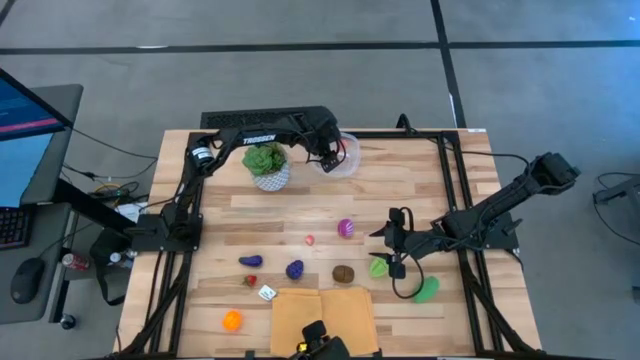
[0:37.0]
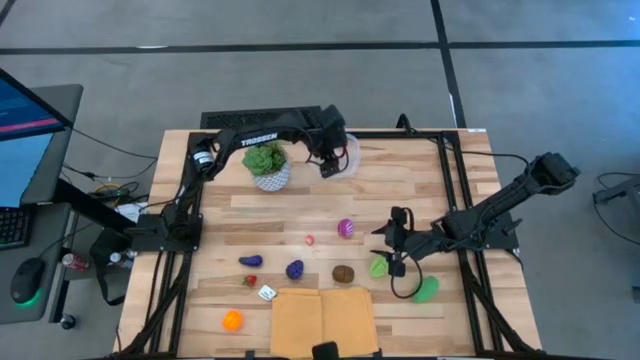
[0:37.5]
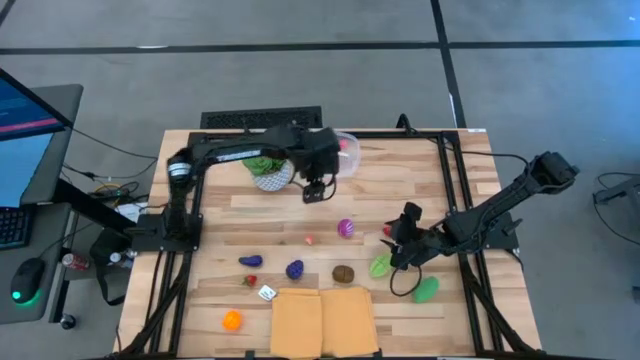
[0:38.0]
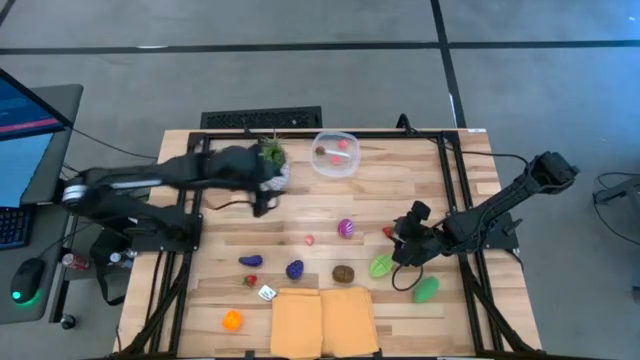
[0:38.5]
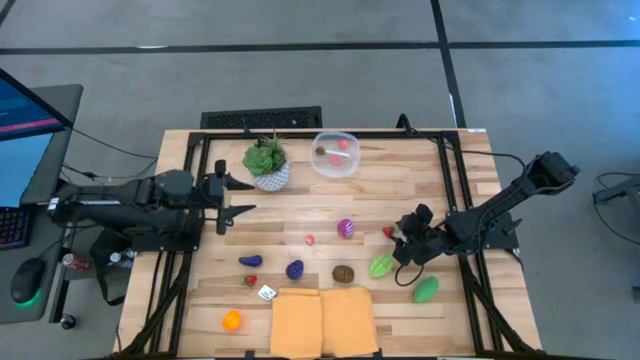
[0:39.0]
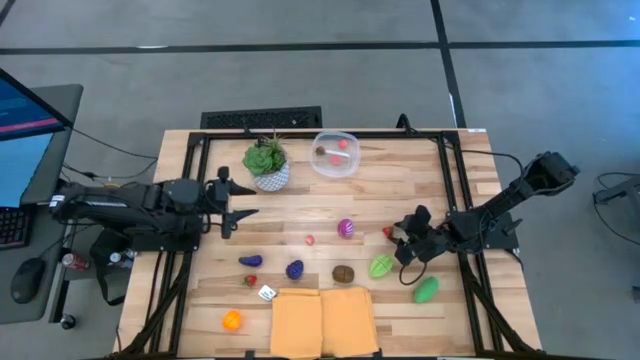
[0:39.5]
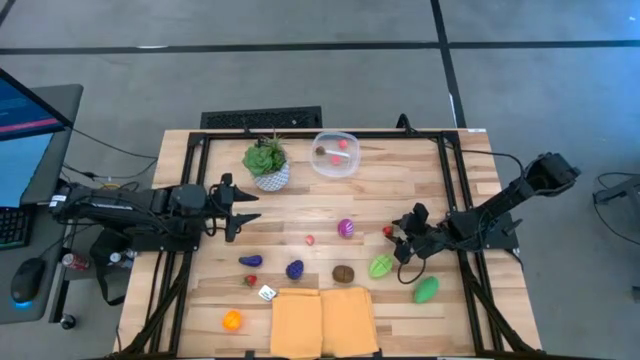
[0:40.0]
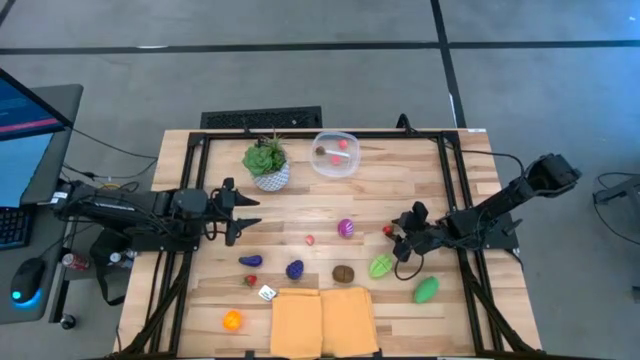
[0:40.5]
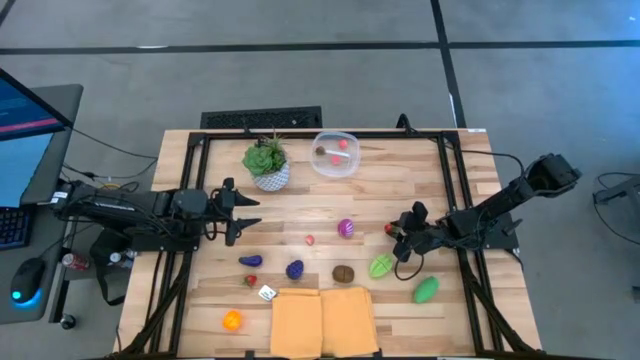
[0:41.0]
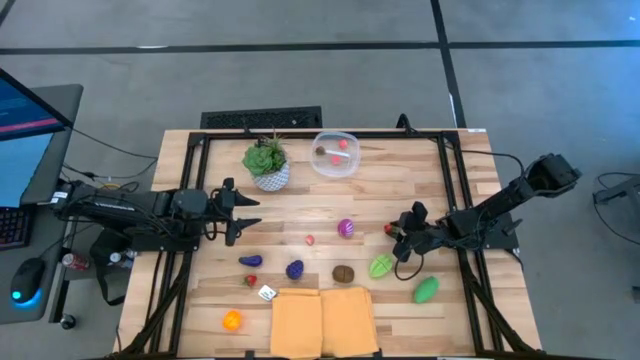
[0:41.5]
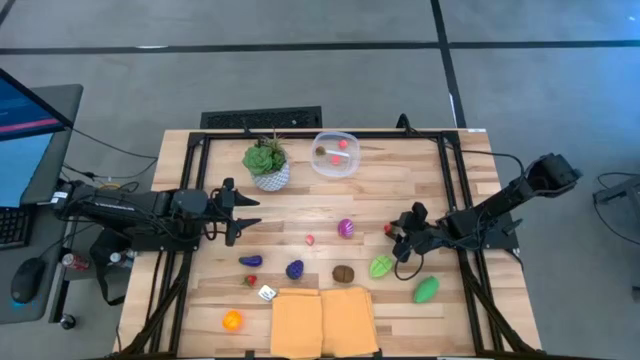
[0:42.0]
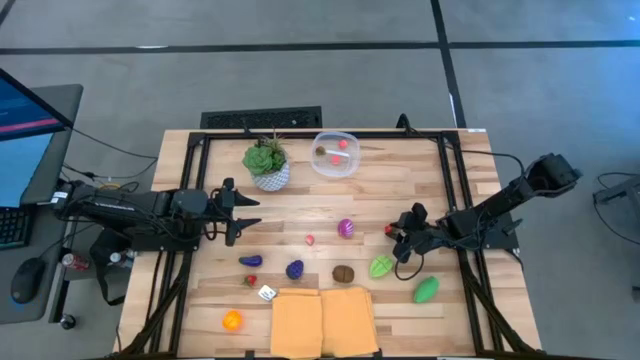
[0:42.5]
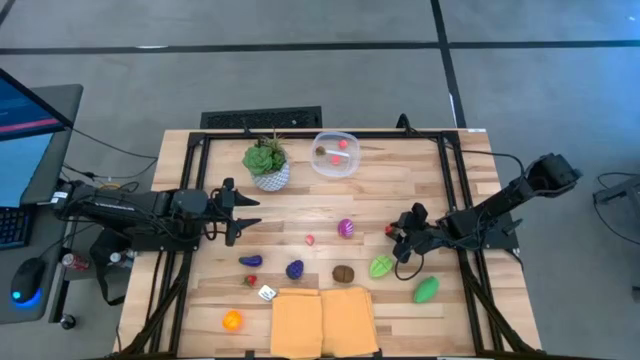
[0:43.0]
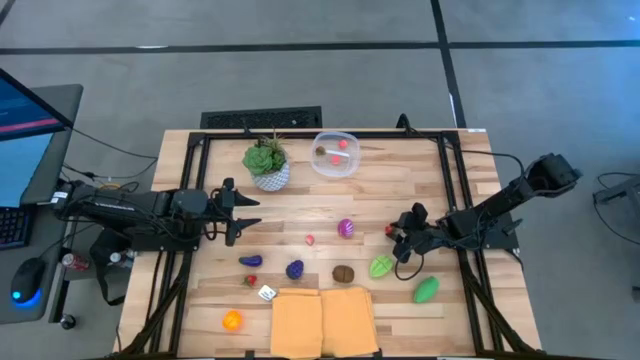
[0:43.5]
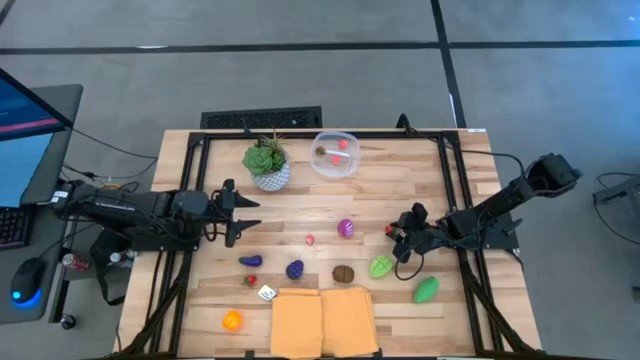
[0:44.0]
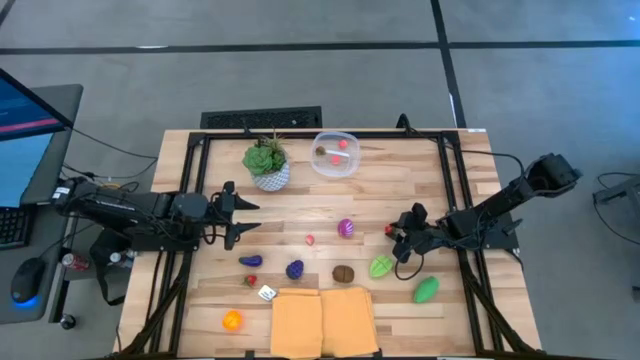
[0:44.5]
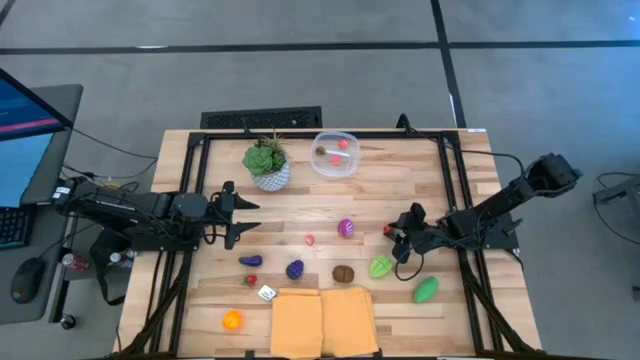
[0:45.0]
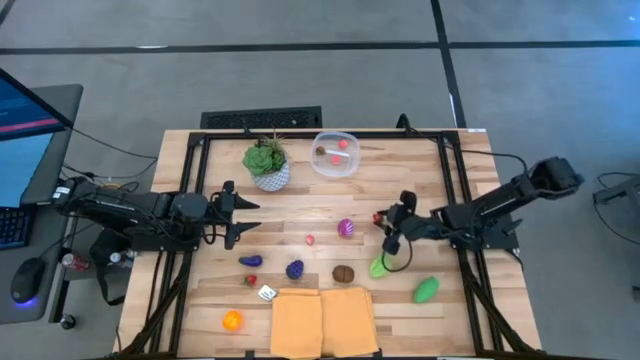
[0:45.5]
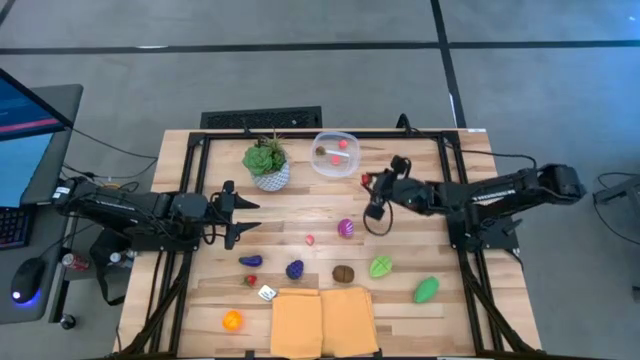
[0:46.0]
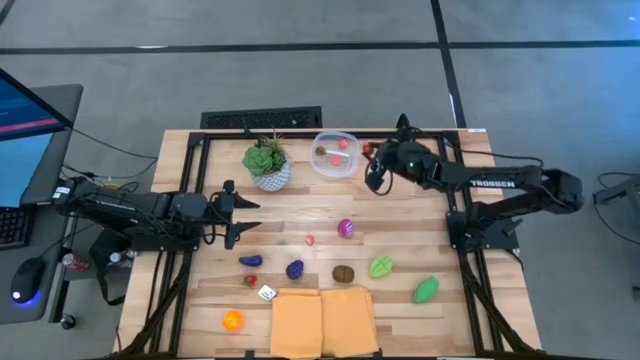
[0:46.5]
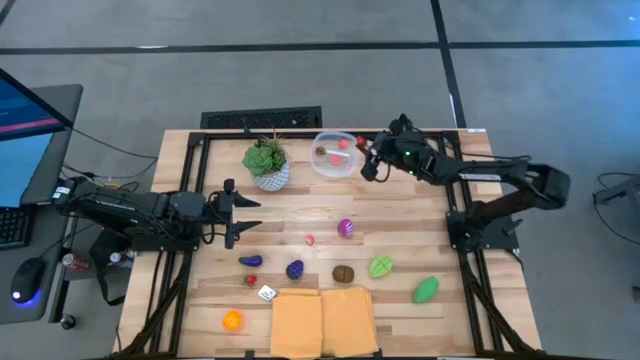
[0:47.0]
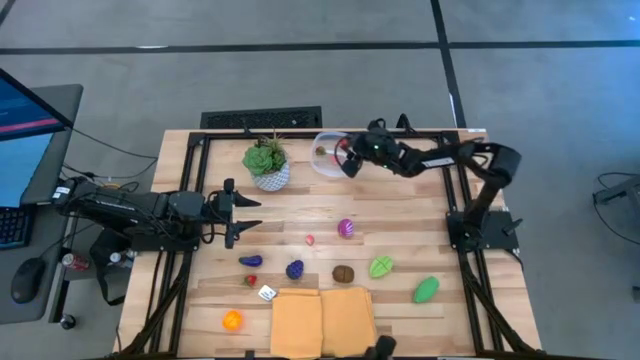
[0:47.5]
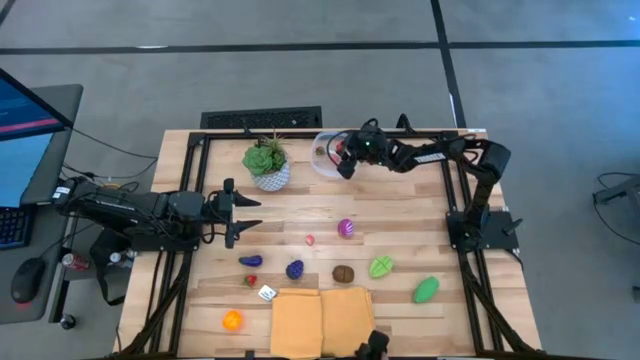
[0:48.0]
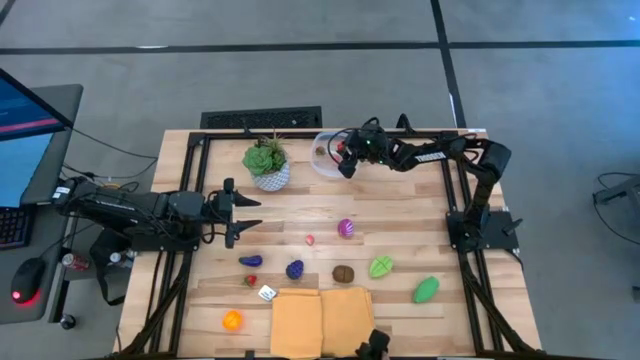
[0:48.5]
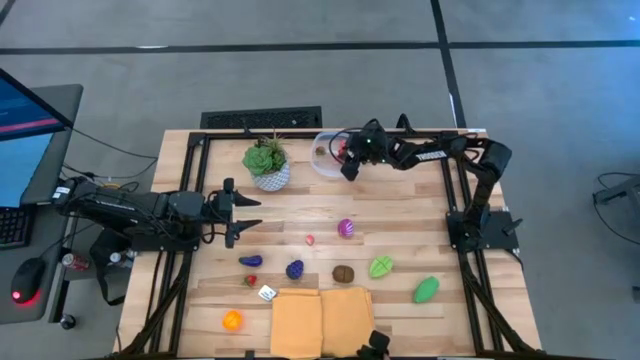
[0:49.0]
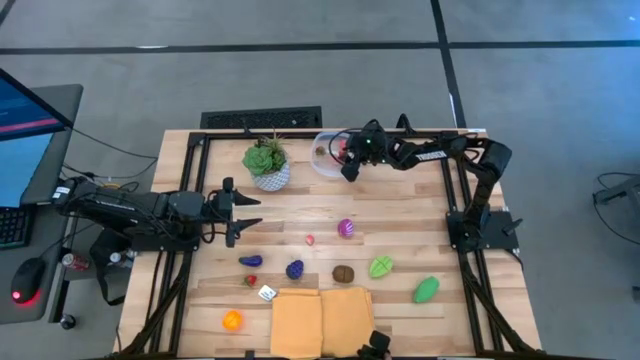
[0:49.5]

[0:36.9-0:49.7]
Task: Pick and placing Produce into tupperware
Put the right strawberry into the transparent bin
